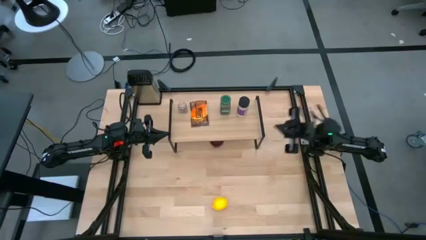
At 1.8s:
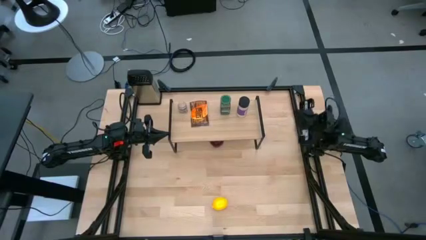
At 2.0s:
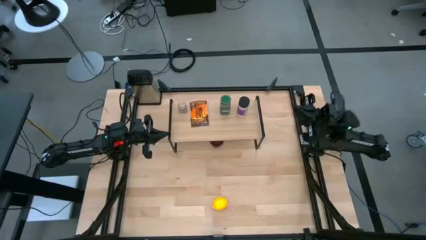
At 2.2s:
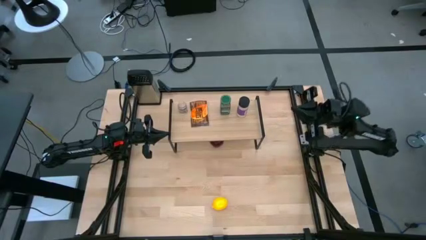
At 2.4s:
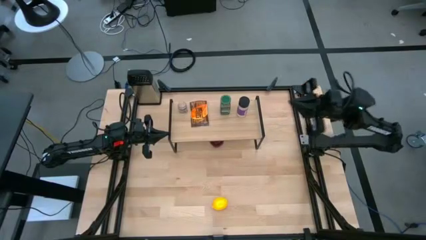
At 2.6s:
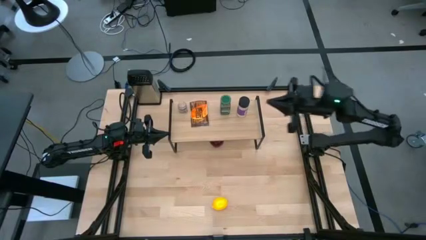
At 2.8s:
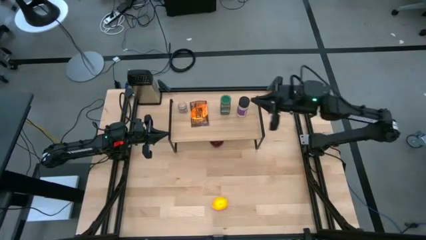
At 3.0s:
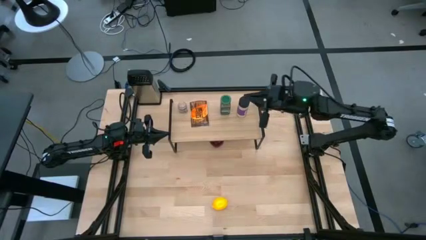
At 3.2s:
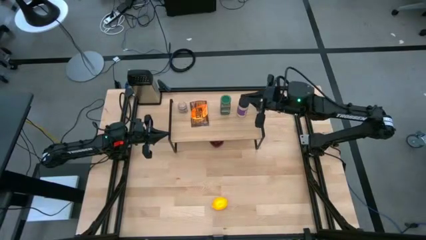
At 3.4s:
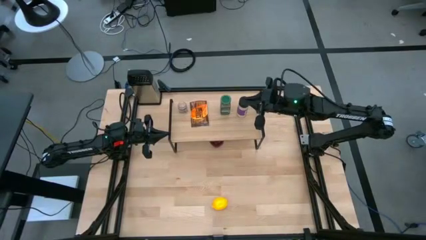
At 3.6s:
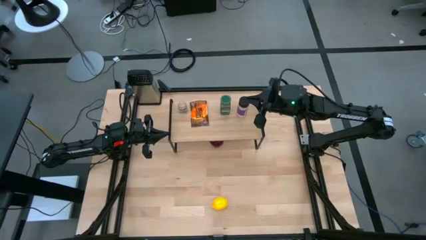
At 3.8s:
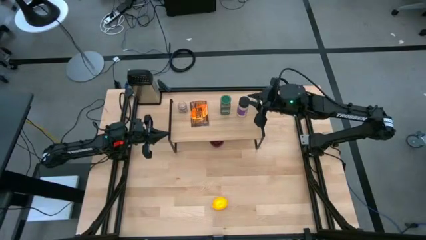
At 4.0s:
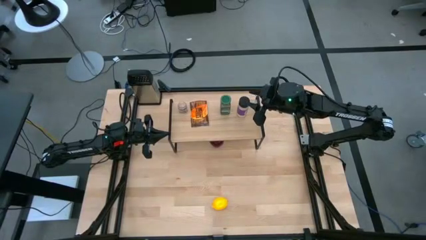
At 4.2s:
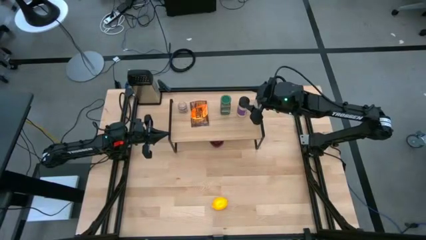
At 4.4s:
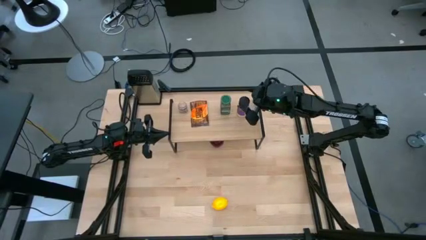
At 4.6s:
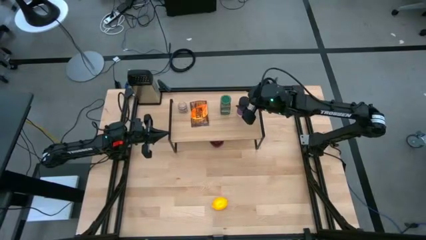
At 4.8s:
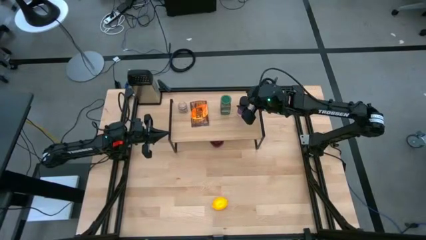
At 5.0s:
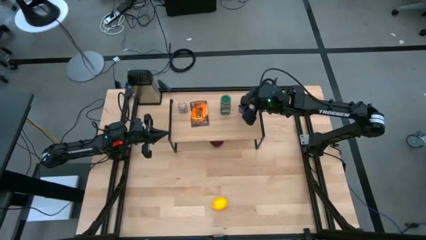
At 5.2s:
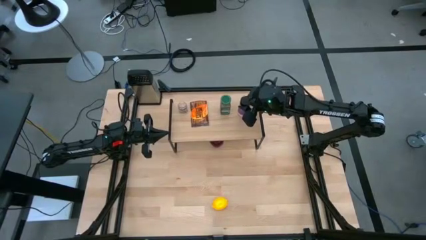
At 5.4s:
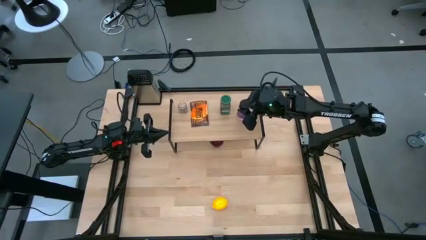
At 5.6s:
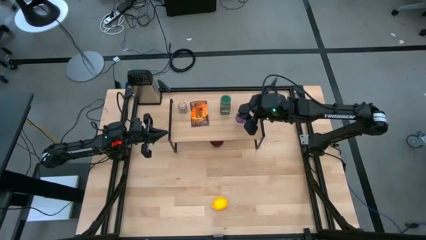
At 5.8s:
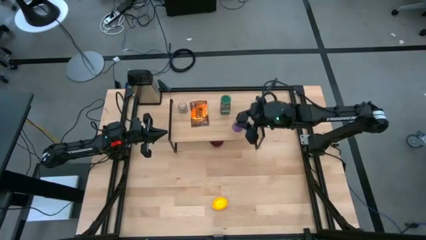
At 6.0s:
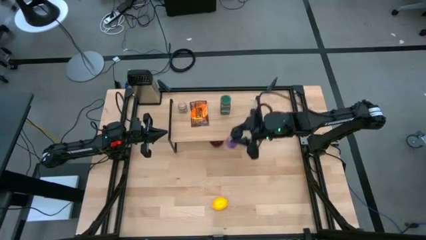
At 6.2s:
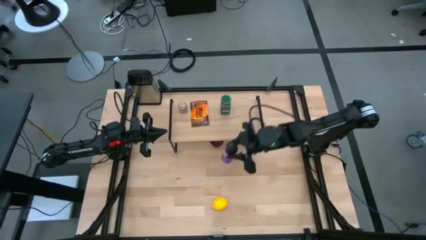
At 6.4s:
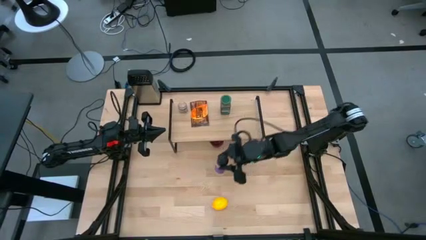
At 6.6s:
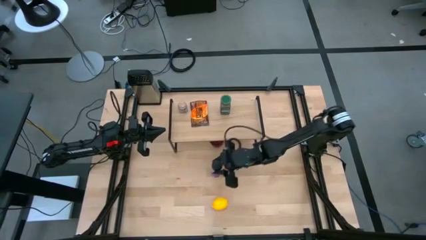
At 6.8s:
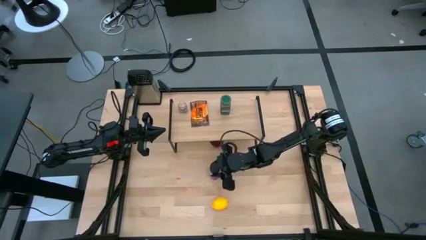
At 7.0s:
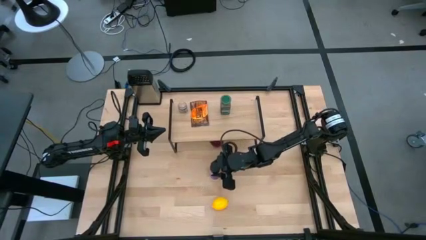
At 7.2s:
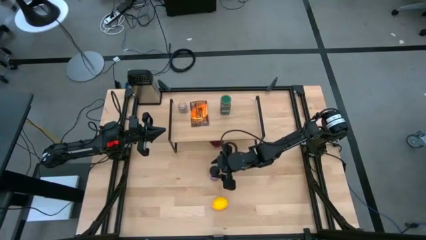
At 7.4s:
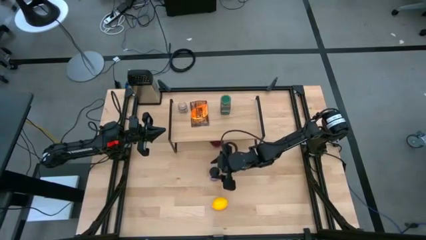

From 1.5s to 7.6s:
Task: Shelf spices
Remove the black seasoning bottle from the shelf

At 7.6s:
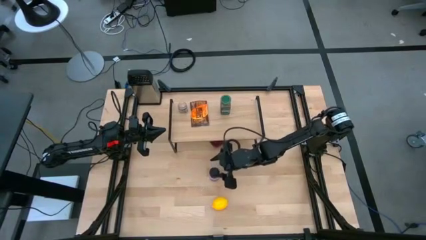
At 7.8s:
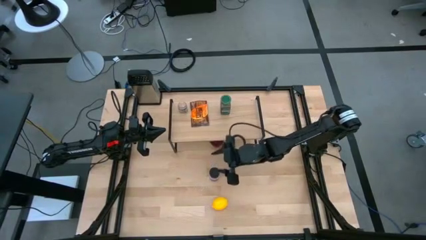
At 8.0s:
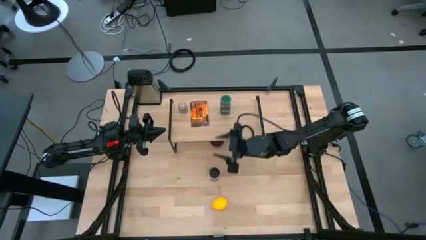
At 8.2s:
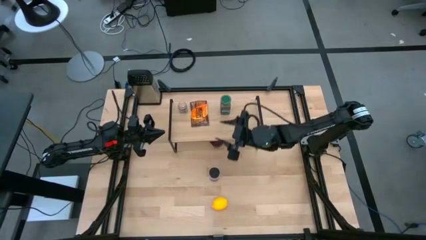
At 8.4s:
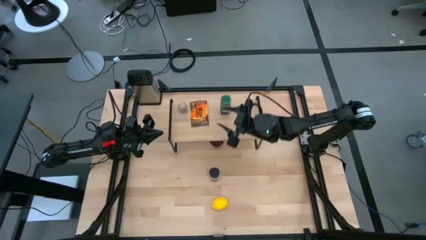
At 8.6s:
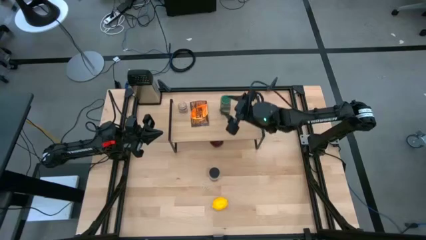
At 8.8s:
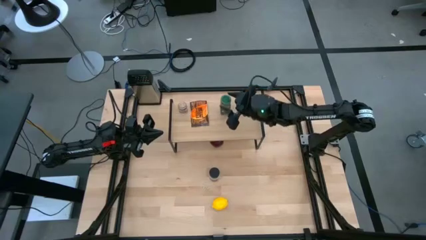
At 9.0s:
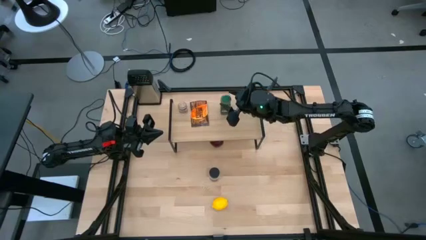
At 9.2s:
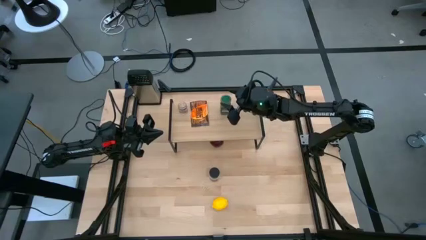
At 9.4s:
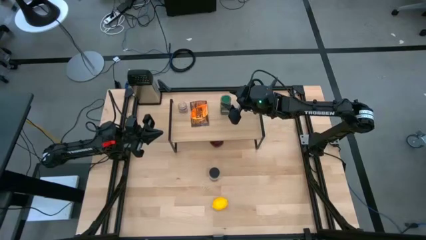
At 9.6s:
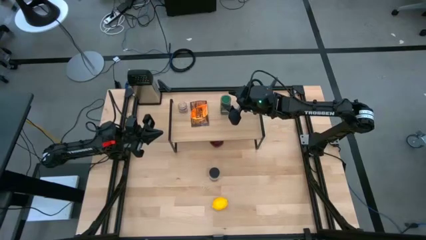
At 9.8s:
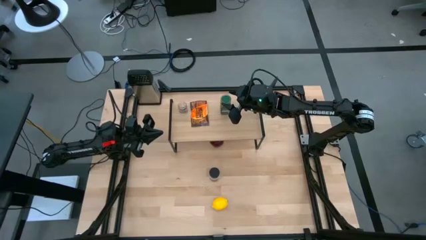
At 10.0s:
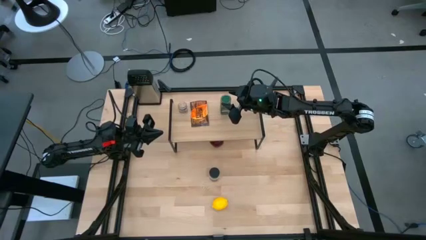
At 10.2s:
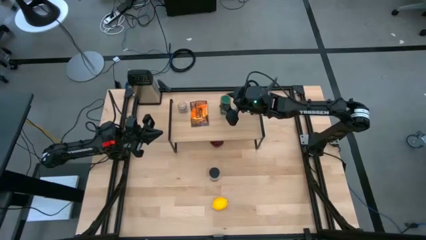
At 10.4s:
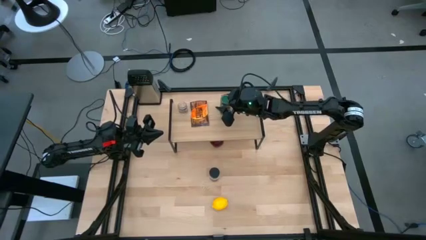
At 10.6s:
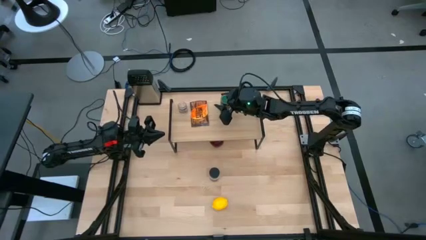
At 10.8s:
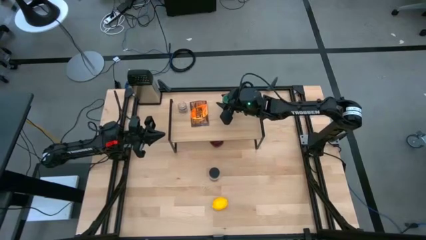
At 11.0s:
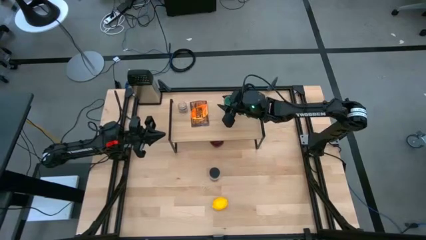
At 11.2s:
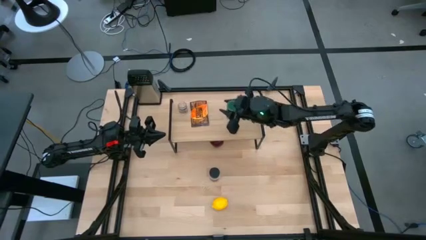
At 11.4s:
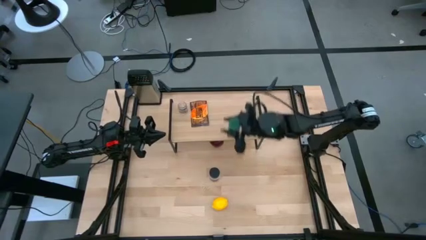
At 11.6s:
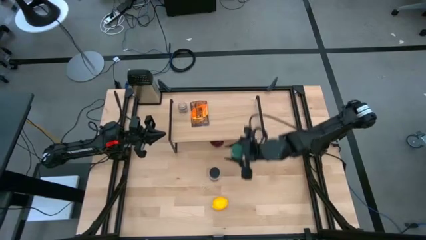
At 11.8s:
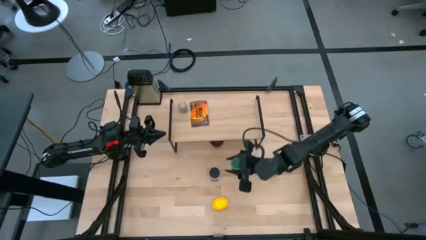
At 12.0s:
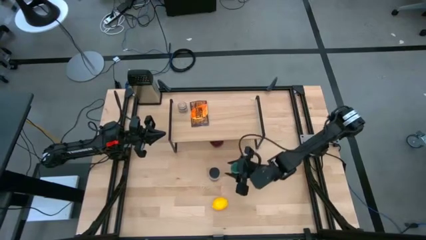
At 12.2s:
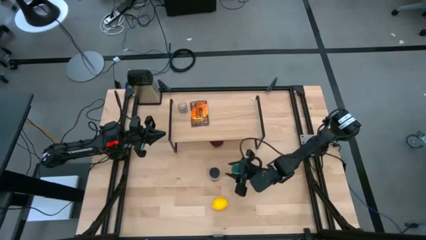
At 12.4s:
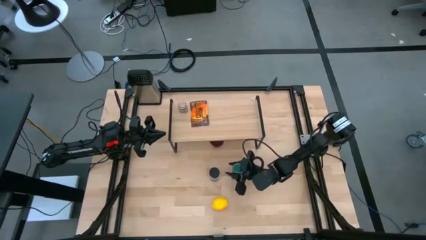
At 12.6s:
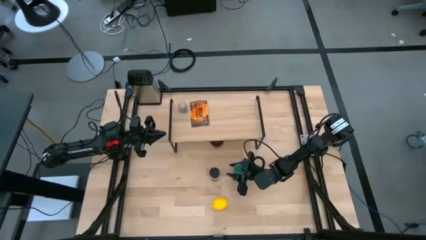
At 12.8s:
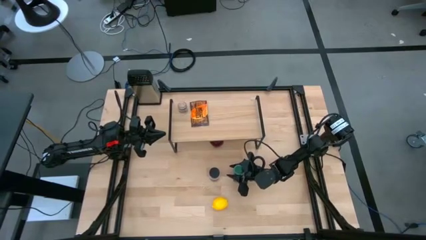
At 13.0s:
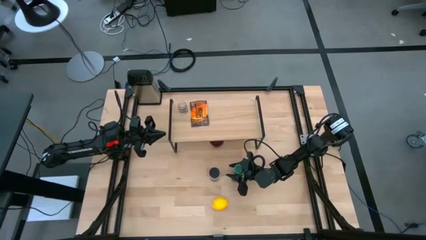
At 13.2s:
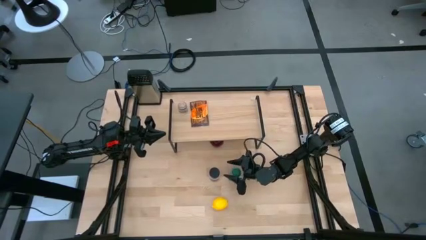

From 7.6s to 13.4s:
Remove the green seasoning bottle from the shelf

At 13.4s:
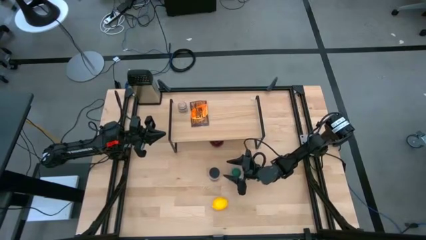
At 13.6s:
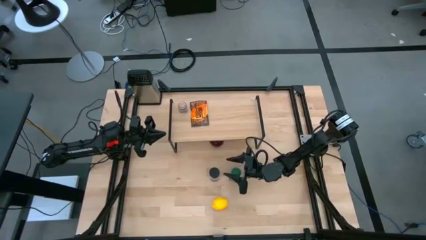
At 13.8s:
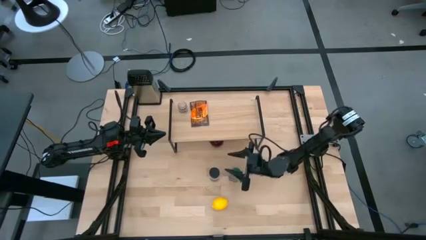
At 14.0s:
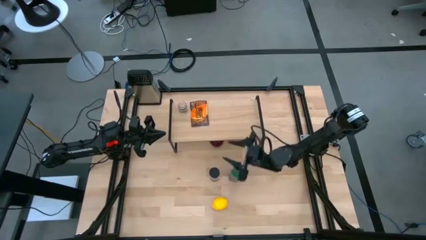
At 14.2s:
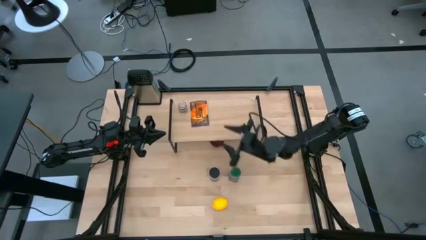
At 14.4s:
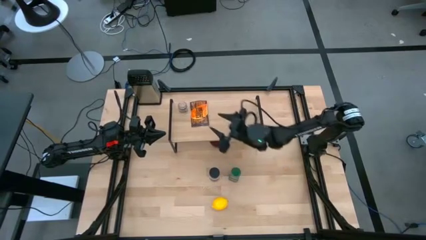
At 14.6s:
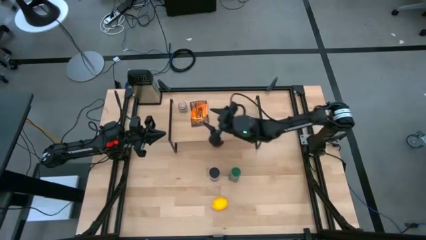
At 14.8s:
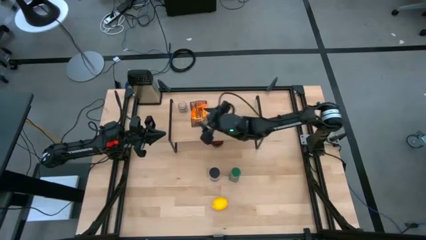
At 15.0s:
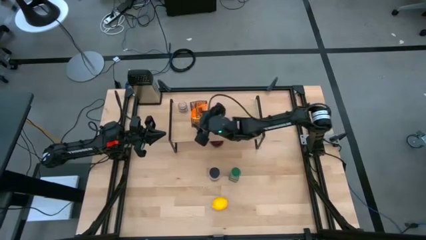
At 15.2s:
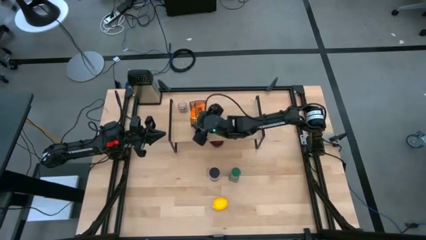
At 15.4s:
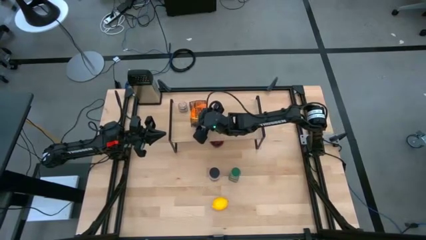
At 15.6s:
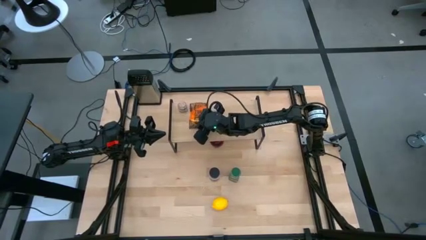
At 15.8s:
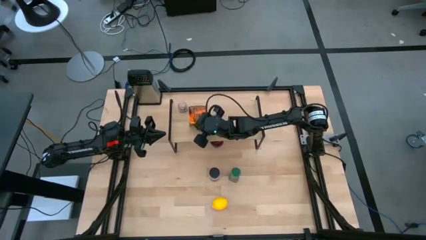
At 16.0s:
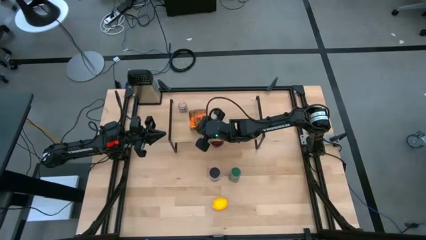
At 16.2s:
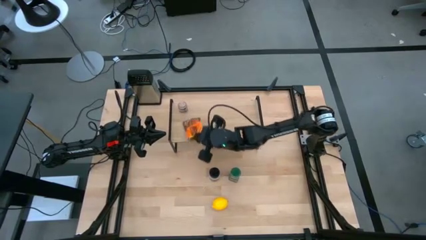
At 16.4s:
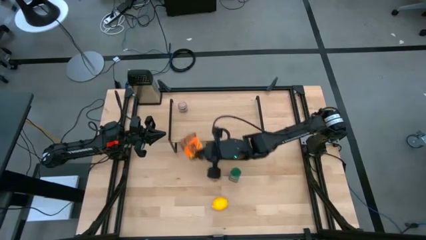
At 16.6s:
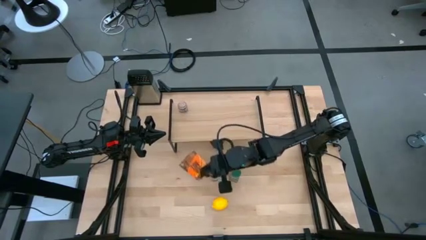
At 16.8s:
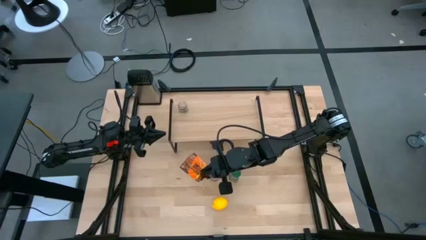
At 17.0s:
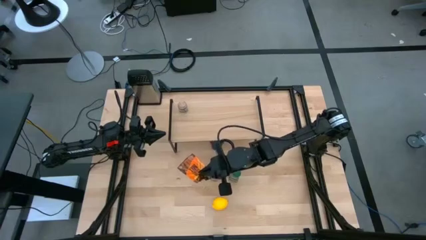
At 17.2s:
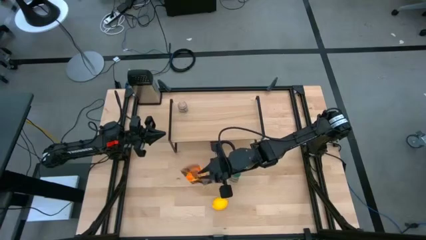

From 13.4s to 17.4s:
Remove the orange seasoning bag from the shelf
